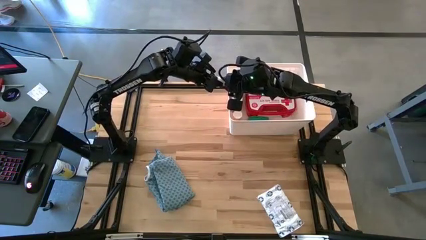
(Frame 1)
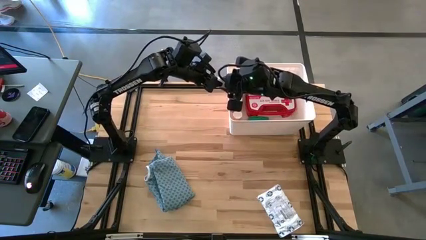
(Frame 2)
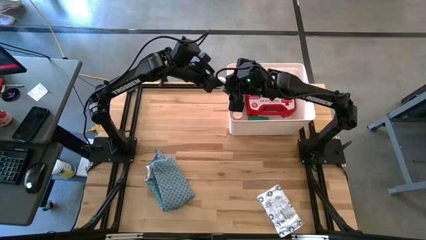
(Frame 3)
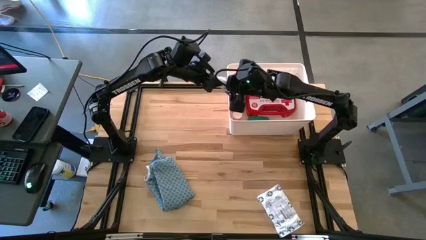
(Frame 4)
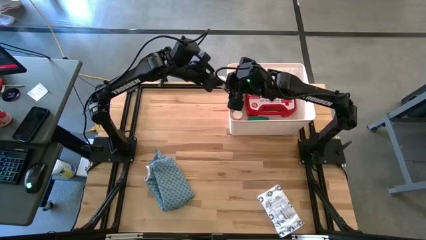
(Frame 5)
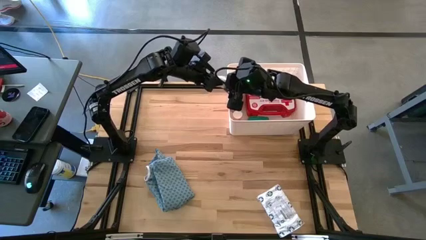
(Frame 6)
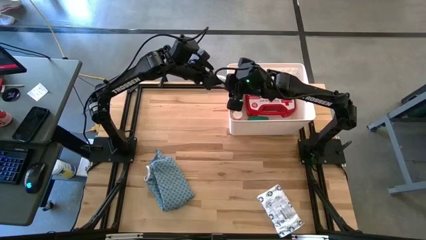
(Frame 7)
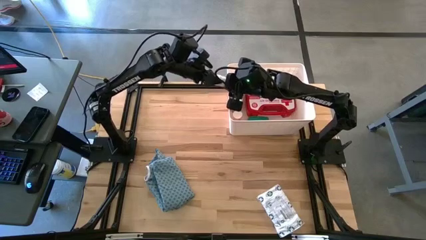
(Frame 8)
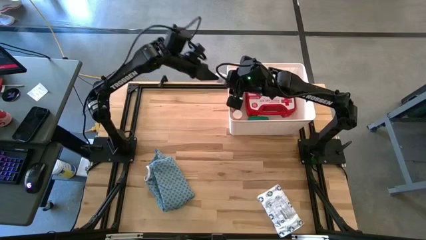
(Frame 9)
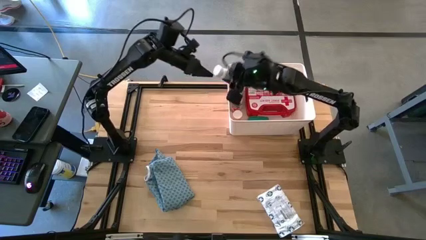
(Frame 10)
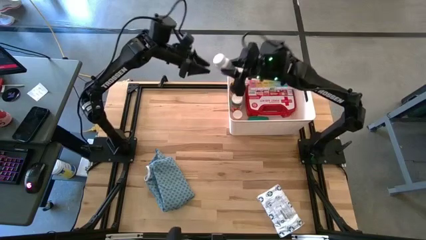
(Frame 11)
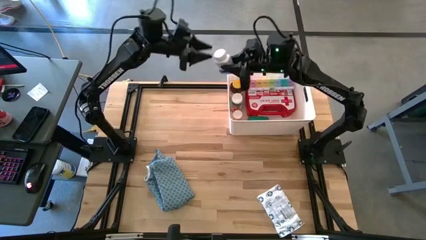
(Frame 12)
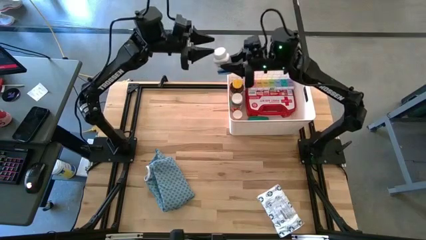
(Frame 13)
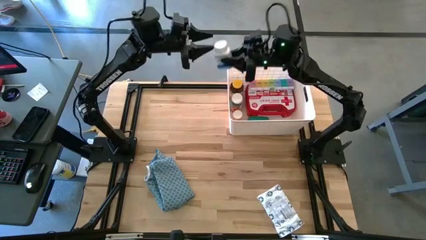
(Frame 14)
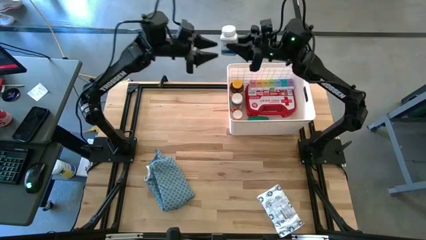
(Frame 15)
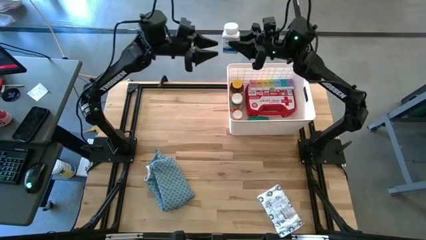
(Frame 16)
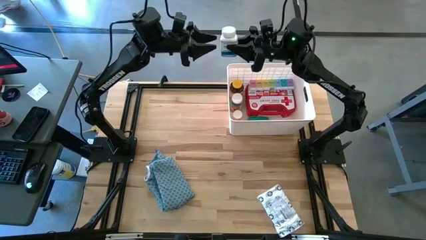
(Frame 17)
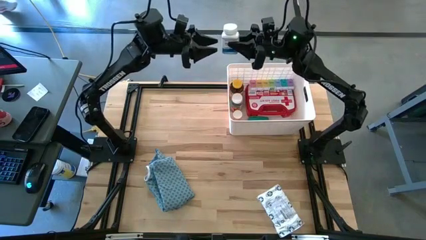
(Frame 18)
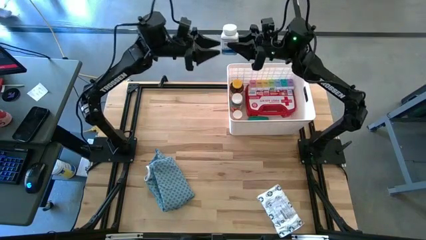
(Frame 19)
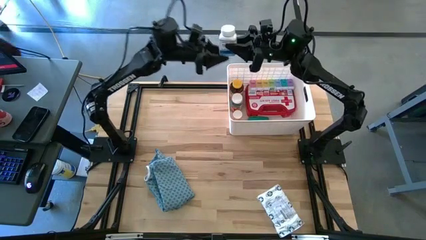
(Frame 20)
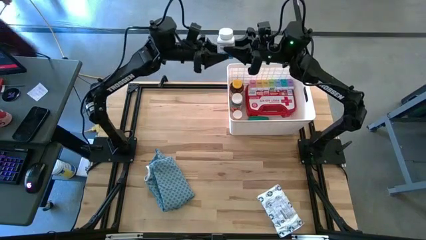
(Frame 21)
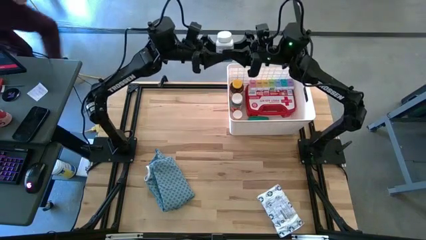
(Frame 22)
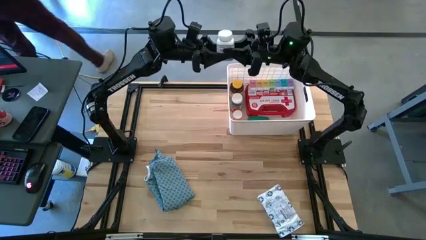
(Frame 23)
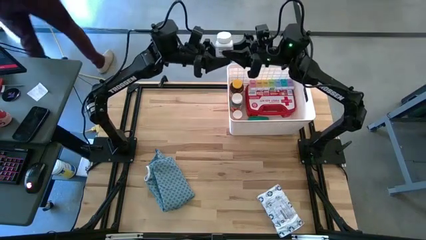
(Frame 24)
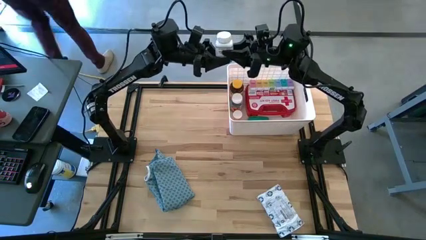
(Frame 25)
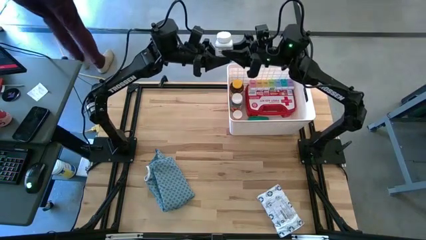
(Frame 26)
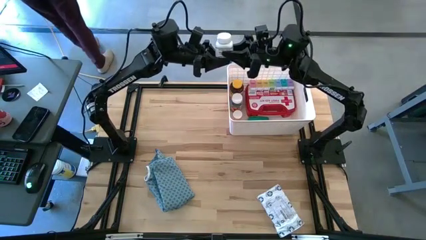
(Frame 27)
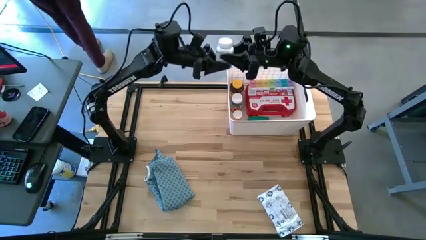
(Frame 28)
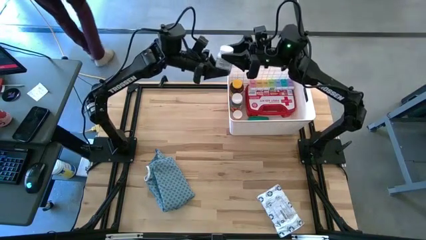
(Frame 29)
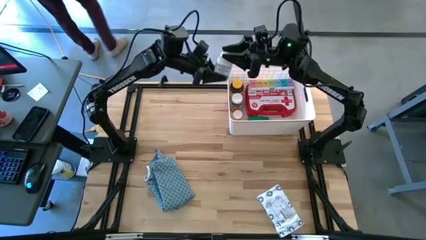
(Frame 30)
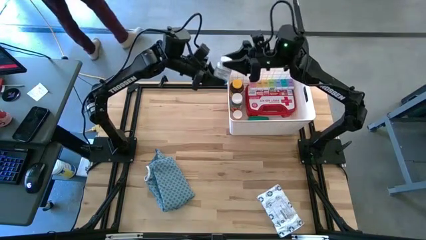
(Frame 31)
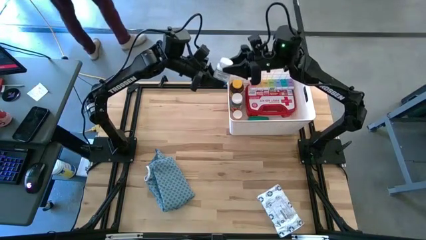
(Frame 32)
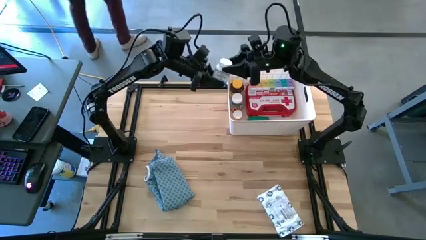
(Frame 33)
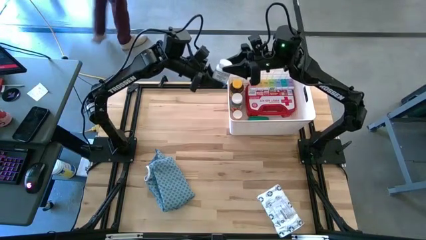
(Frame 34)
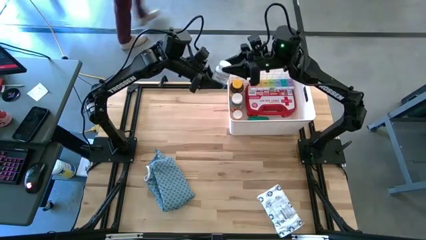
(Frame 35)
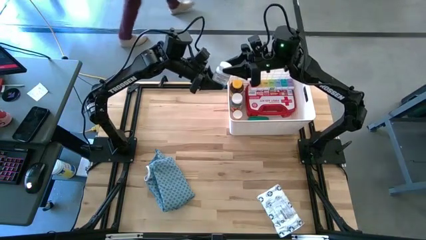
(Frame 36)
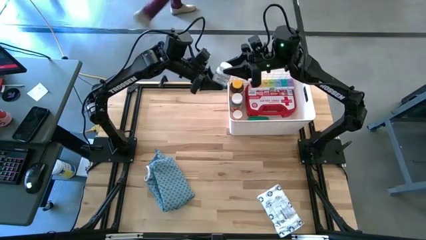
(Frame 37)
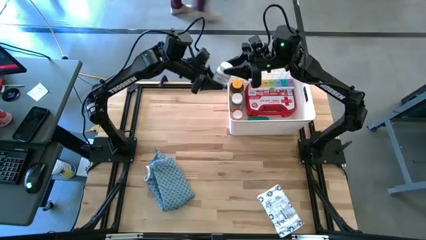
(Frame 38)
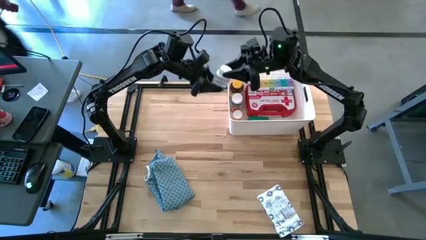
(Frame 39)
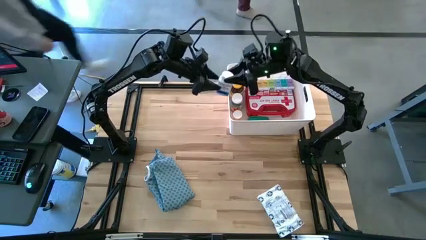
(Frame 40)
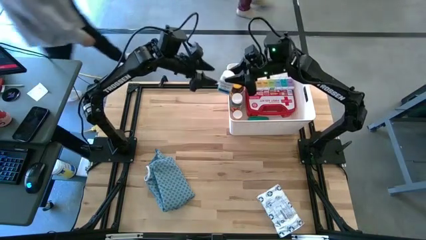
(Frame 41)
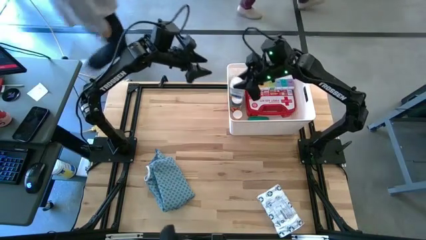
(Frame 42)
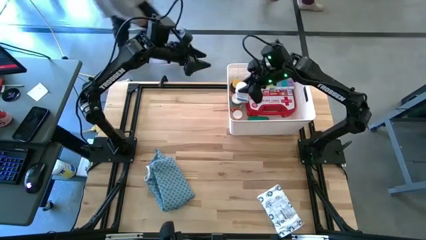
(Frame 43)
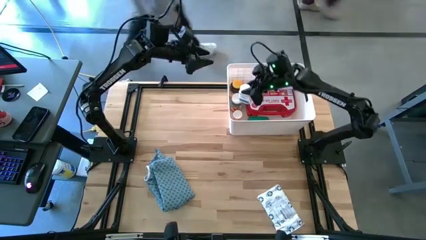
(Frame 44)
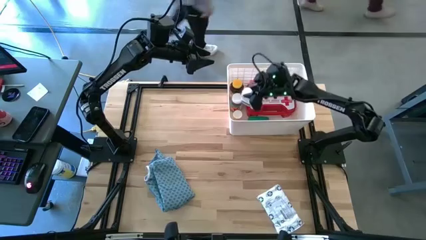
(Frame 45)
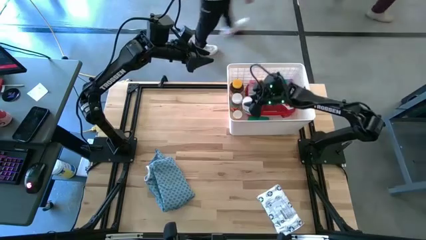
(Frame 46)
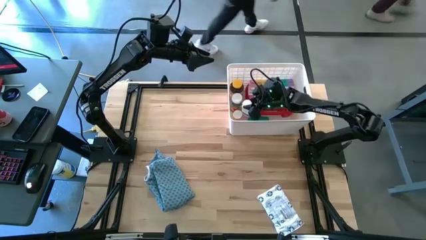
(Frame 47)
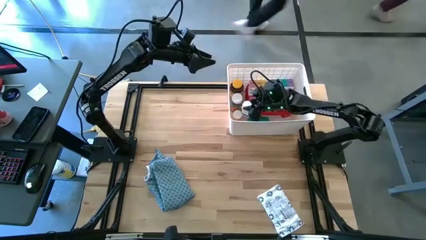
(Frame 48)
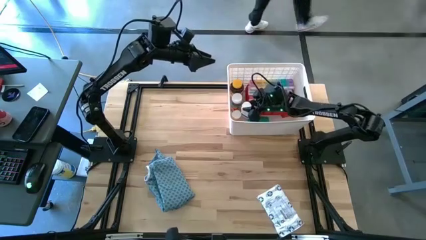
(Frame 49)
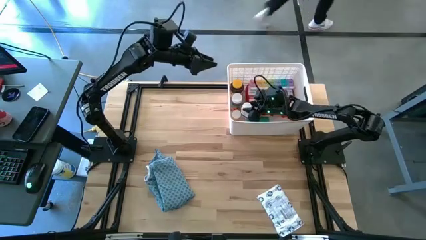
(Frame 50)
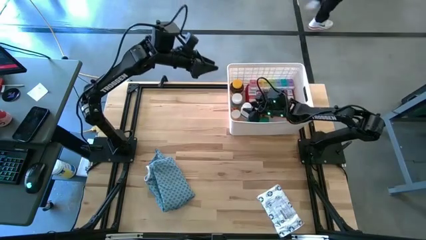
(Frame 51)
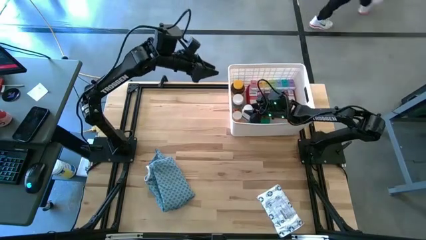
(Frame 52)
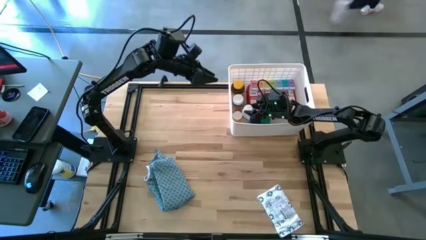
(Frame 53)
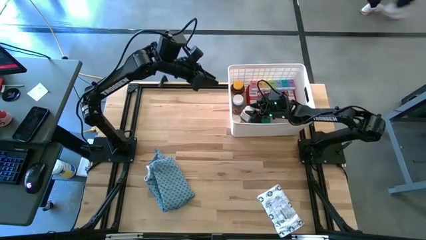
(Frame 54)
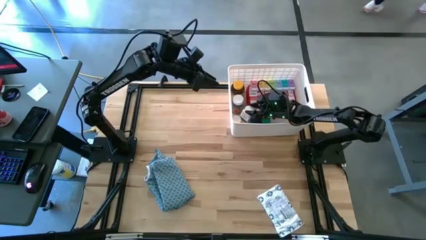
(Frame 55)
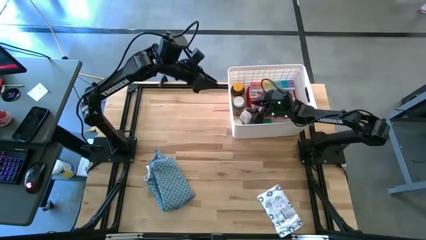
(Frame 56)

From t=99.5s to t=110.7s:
Task: Pick & place medical supplies in basket/bin
Put the white and blue pill bottle into the white bin

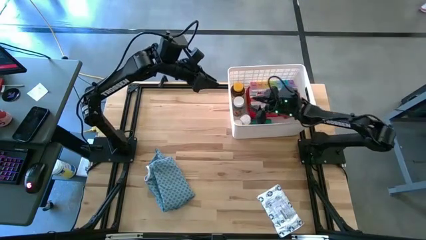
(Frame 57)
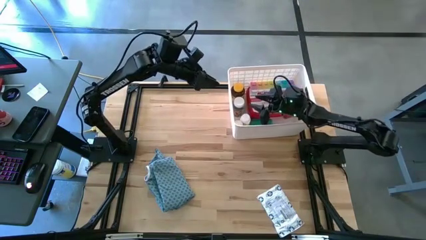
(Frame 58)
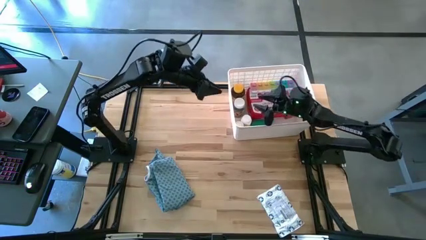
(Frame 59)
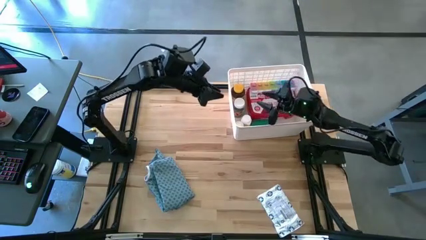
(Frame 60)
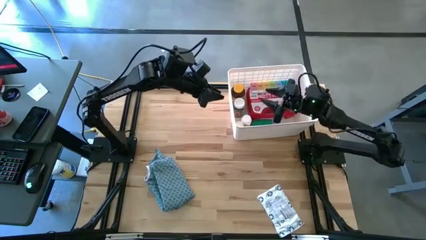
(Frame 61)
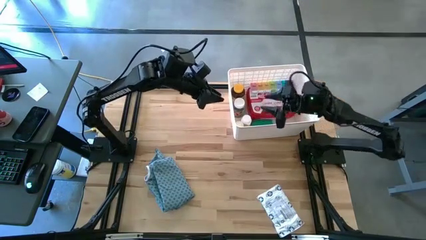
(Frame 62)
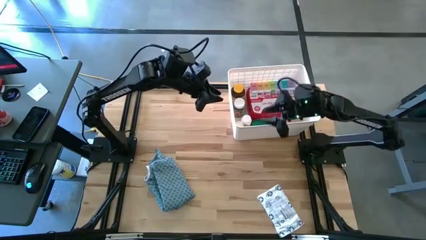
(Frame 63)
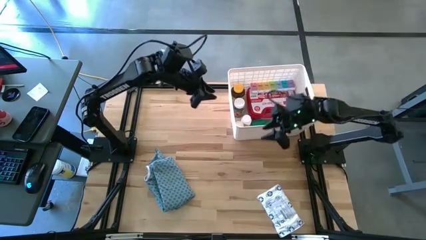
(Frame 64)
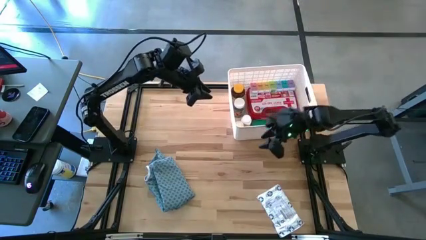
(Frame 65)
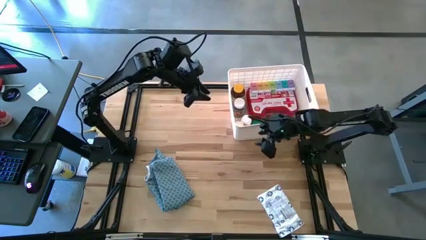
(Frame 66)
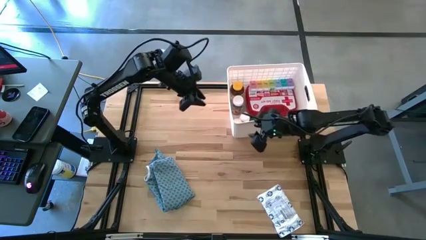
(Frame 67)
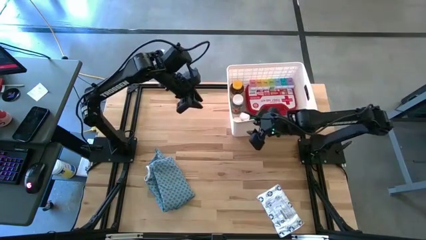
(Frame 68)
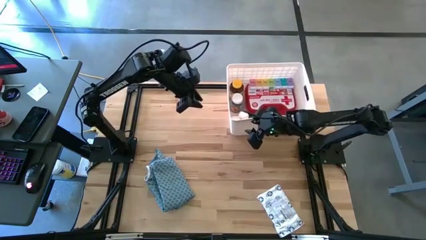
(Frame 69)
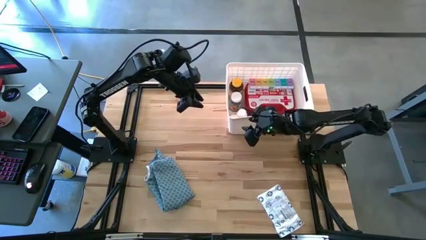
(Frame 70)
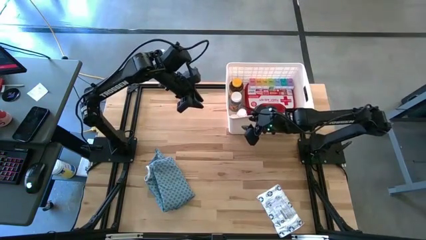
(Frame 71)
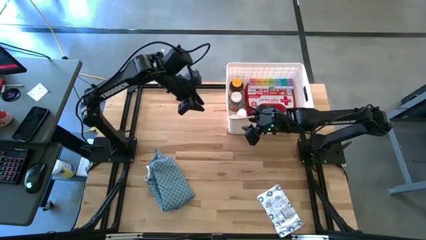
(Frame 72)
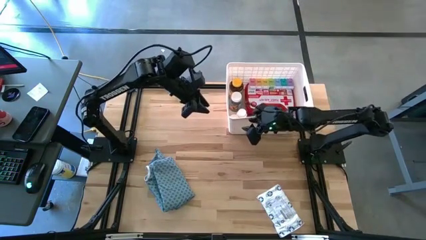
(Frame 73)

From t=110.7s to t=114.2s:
Adjust the white bin
